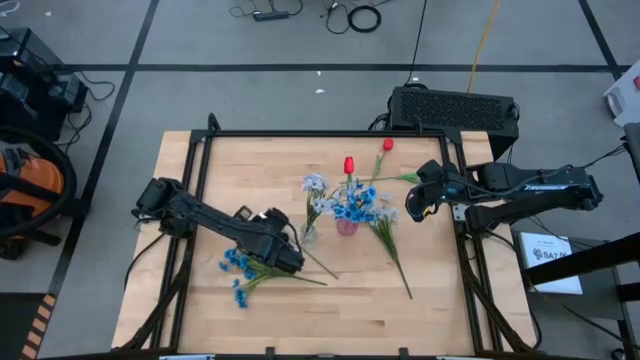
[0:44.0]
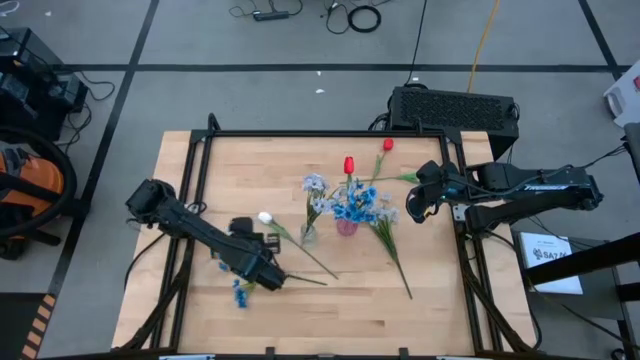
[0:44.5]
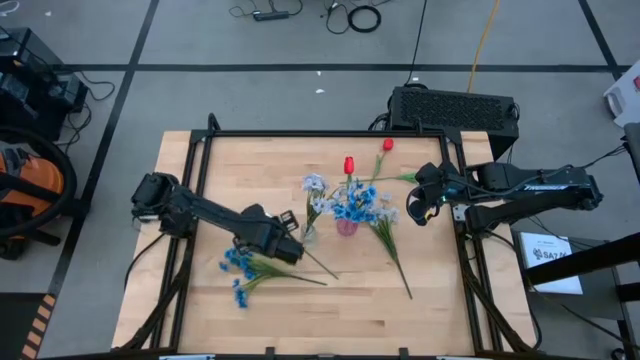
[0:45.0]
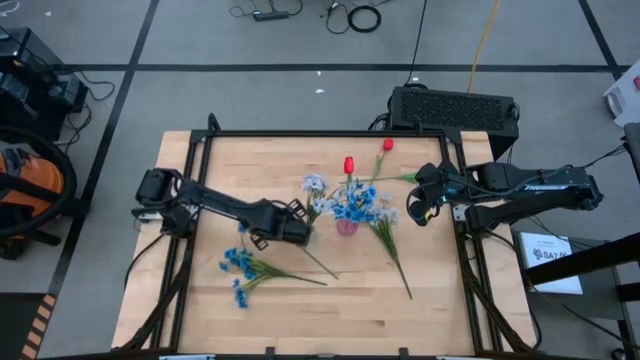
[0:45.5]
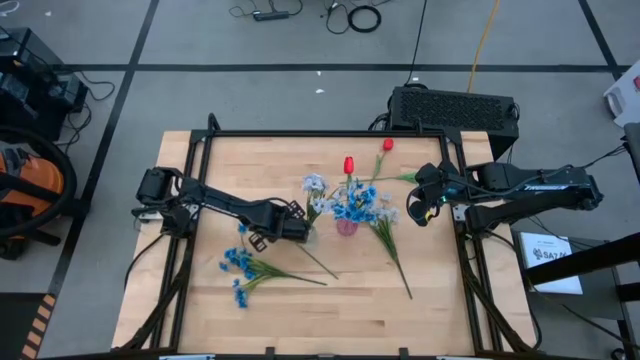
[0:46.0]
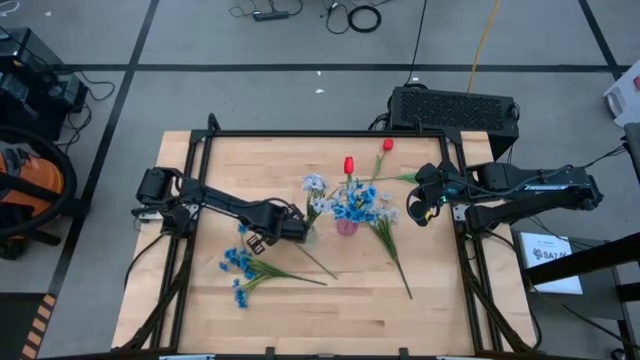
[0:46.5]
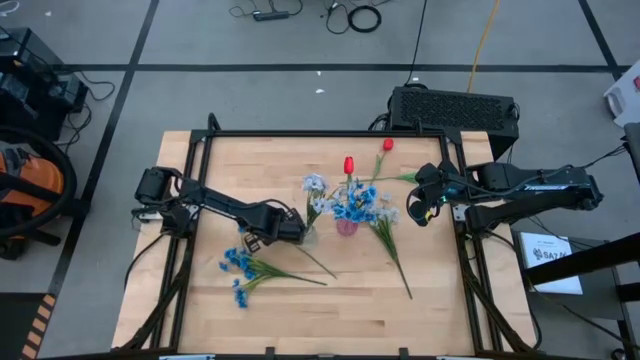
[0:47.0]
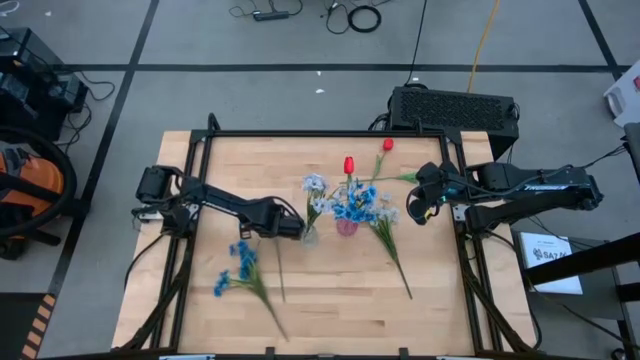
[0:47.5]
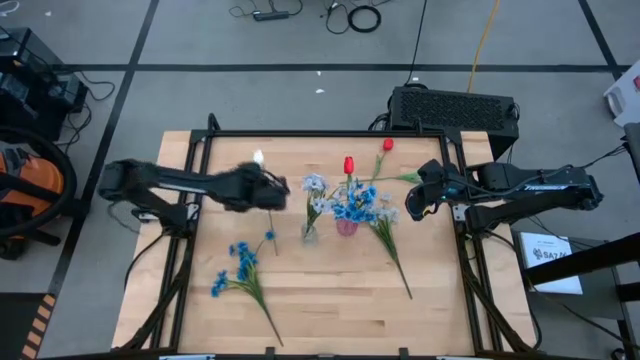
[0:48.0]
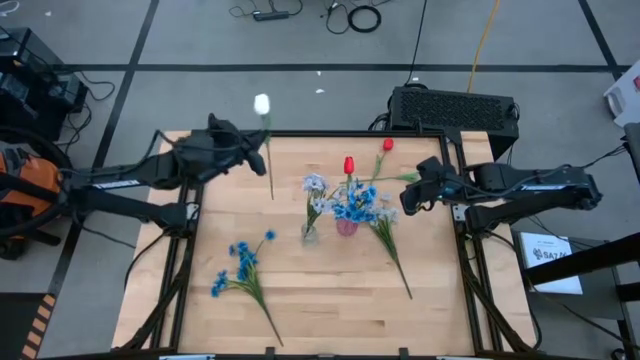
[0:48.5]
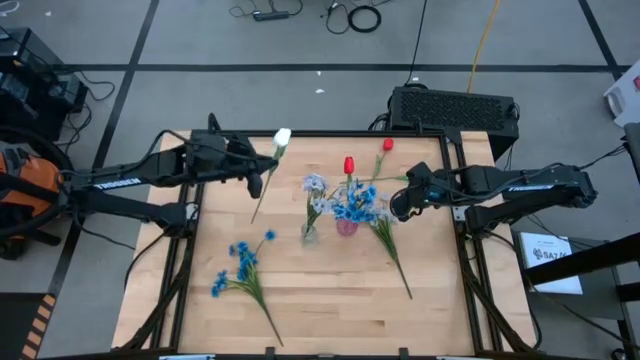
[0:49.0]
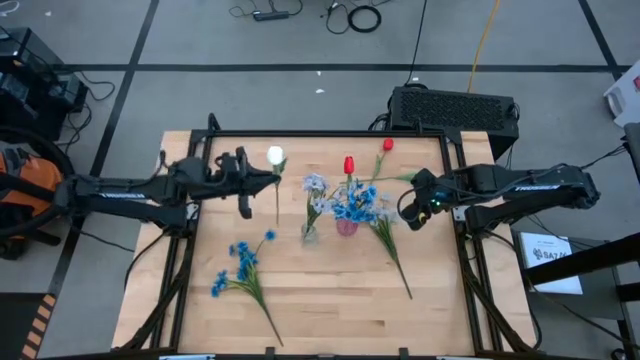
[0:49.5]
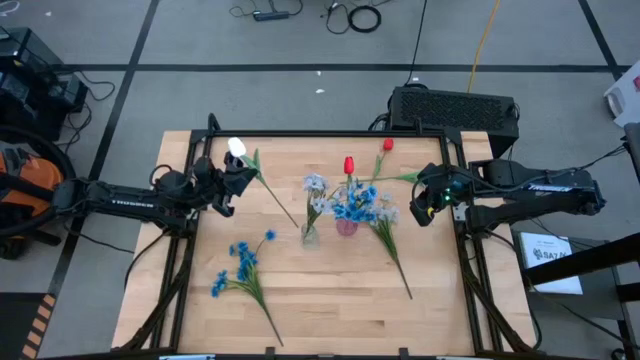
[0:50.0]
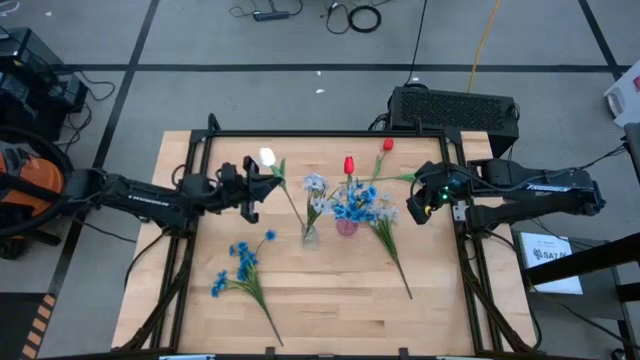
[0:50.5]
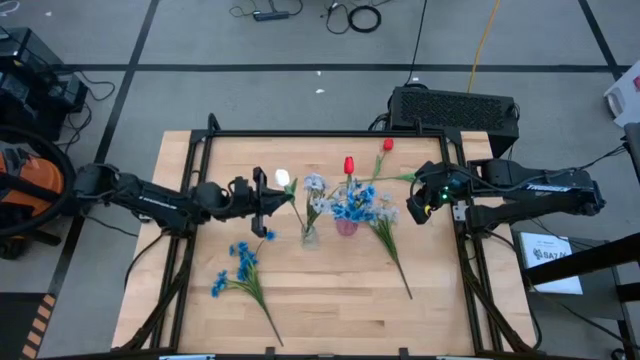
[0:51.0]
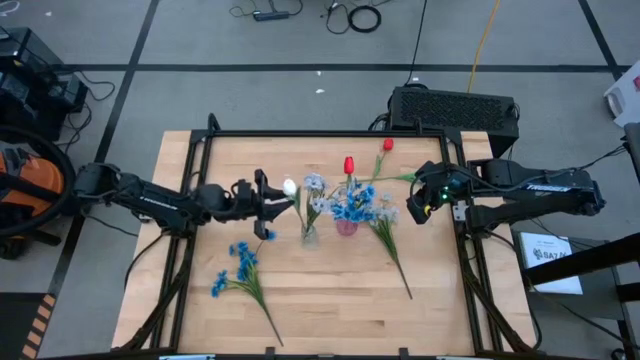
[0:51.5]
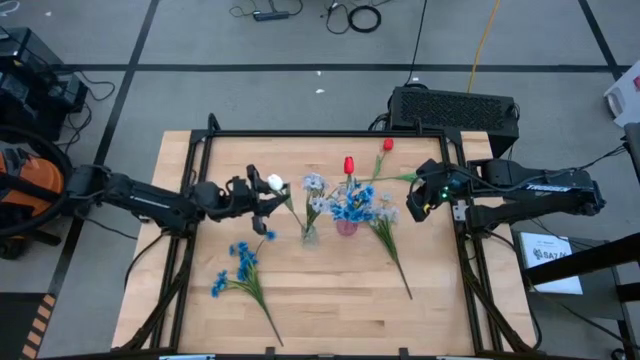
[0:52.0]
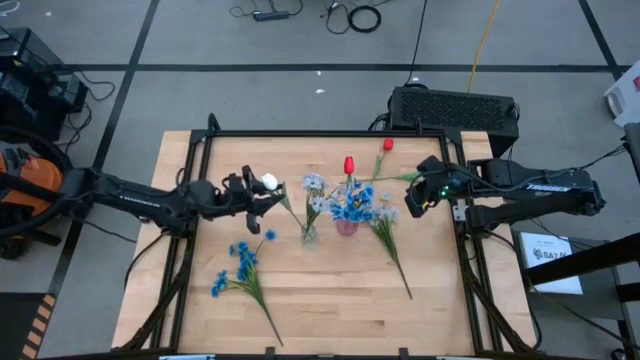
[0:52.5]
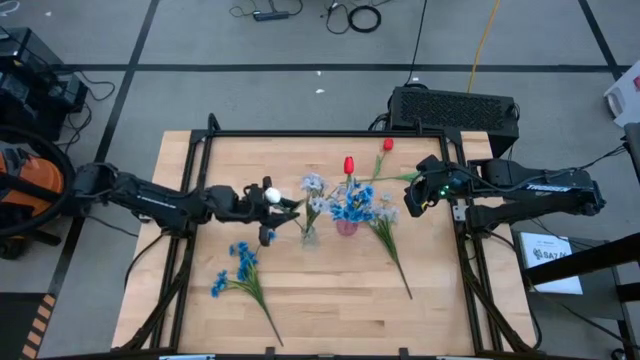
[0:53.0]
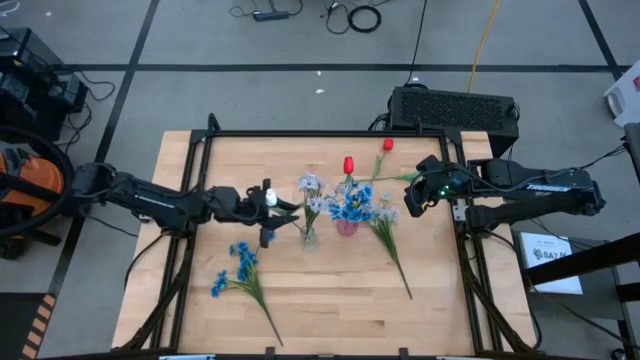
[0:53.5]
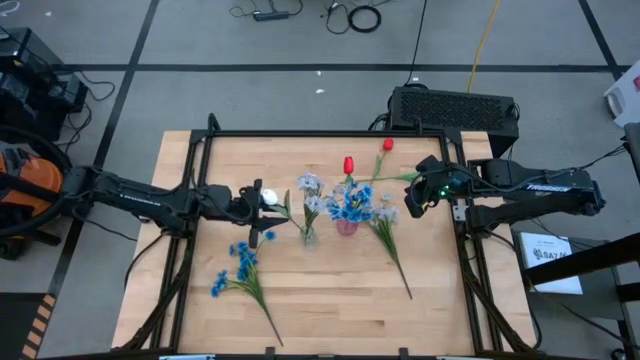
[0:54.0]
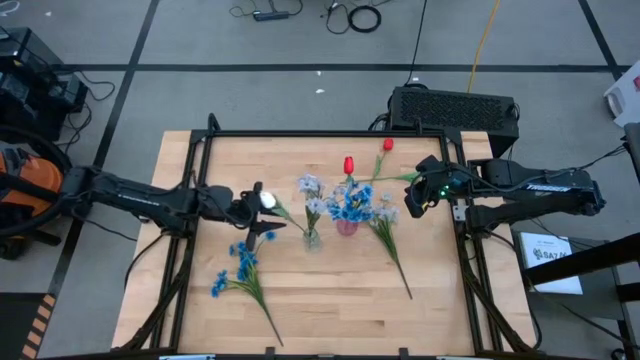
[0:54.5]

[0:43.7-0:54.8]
Task: Sort flowers into vase by color
Put the bottom white flower into the transparent vase

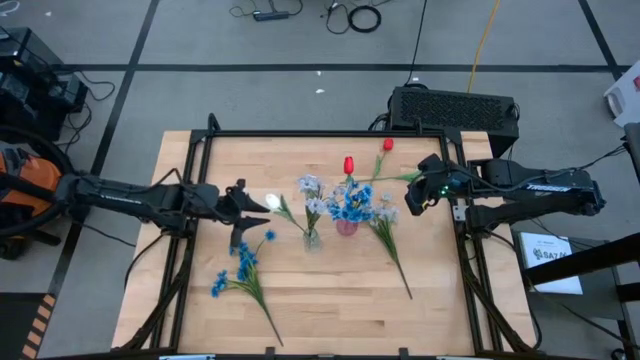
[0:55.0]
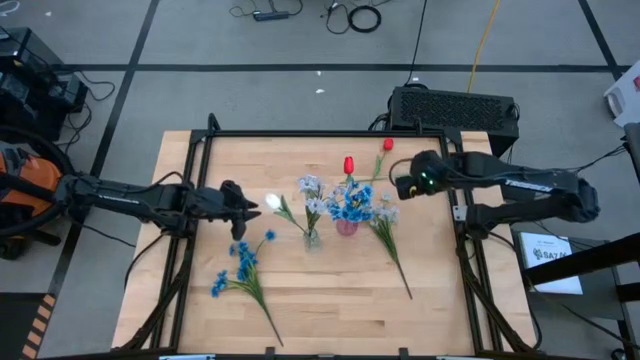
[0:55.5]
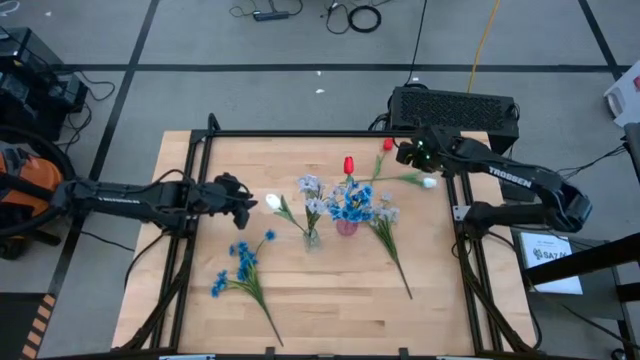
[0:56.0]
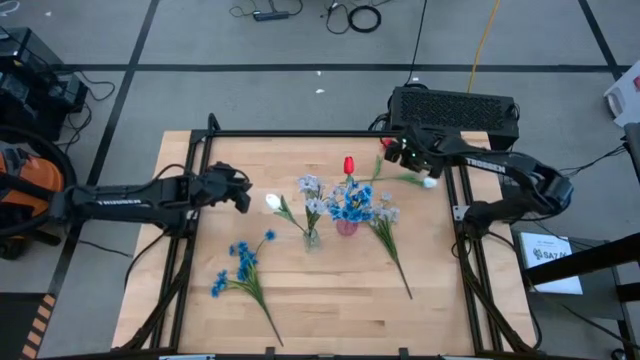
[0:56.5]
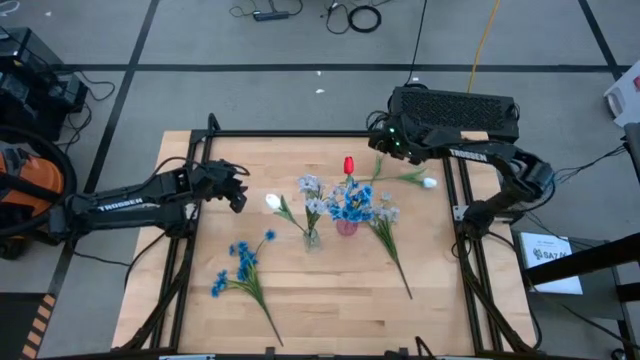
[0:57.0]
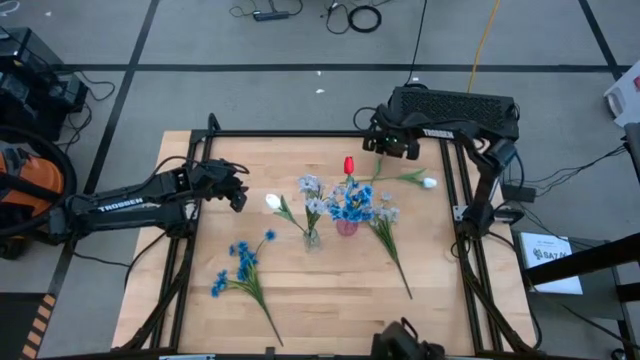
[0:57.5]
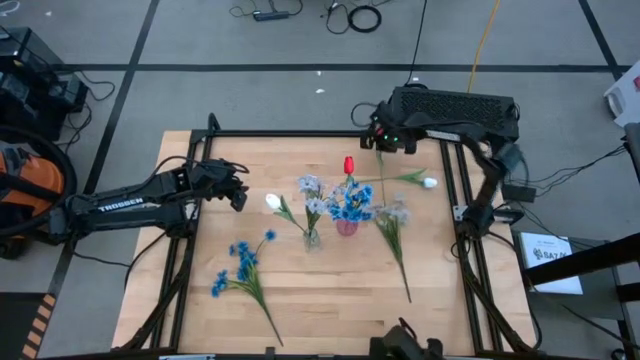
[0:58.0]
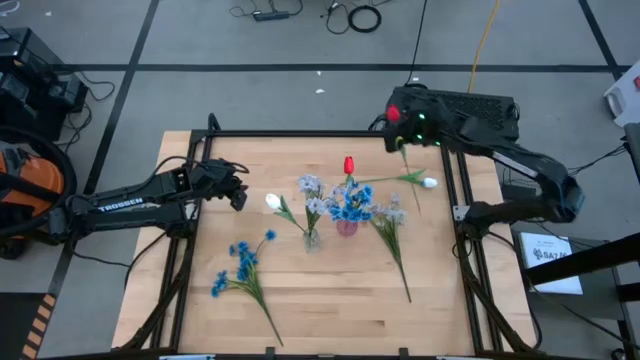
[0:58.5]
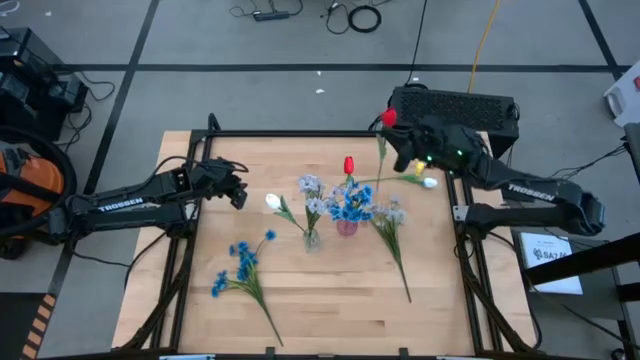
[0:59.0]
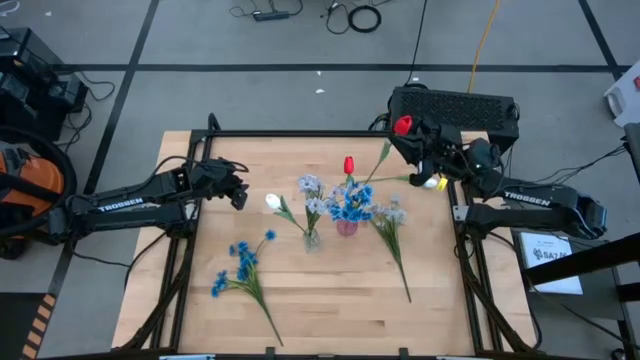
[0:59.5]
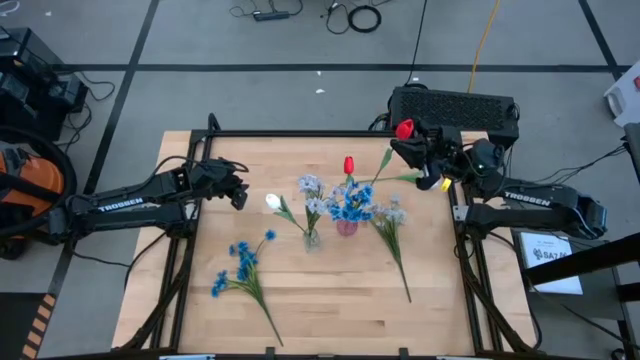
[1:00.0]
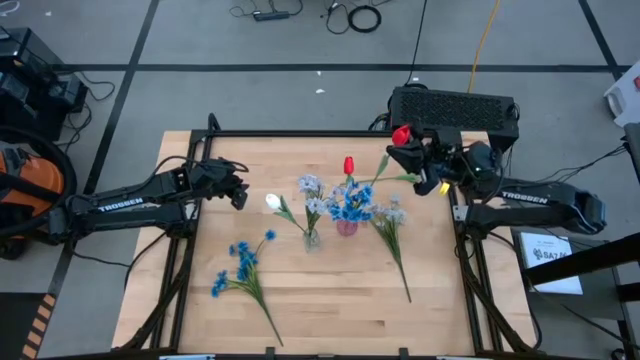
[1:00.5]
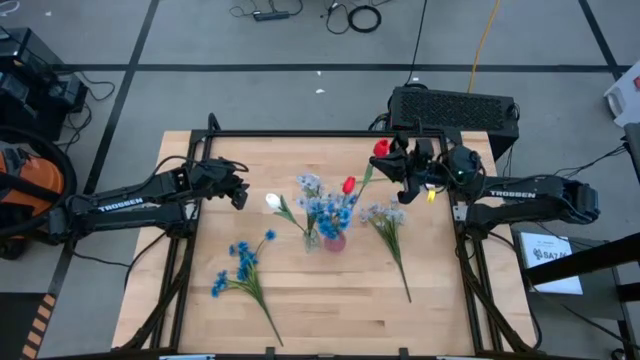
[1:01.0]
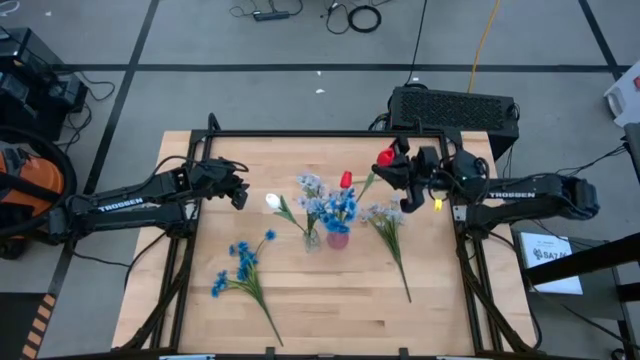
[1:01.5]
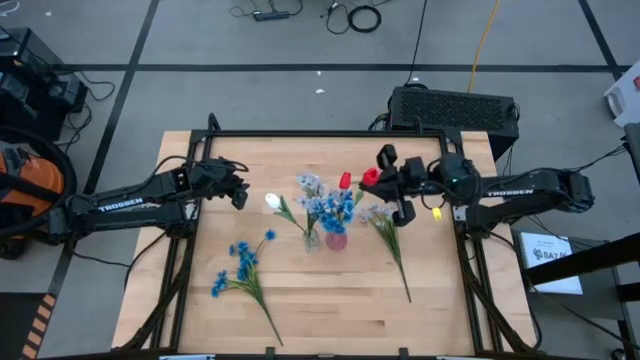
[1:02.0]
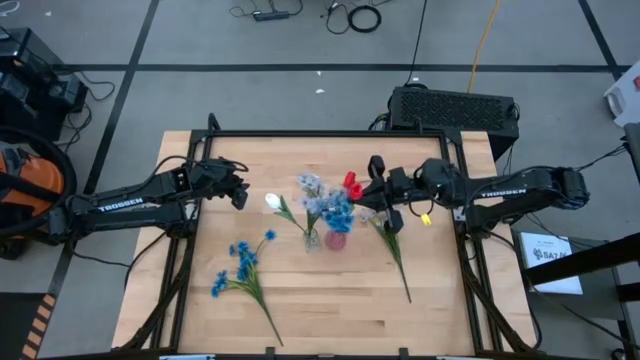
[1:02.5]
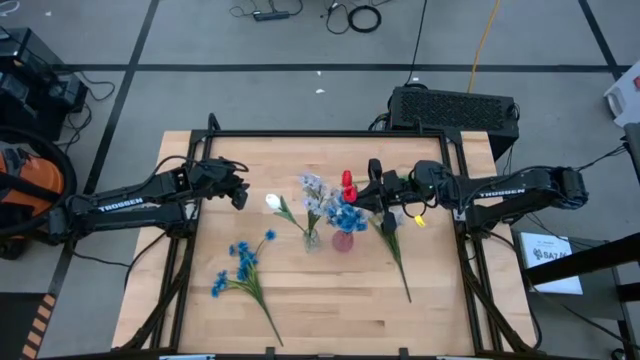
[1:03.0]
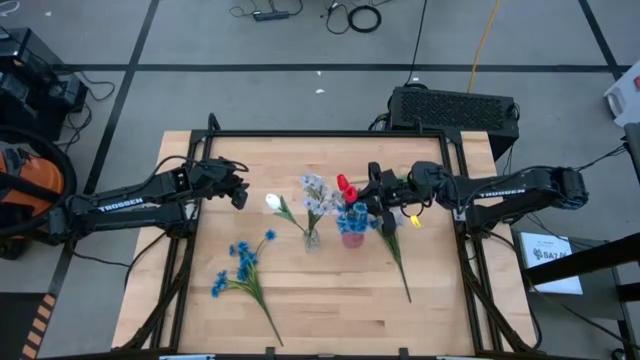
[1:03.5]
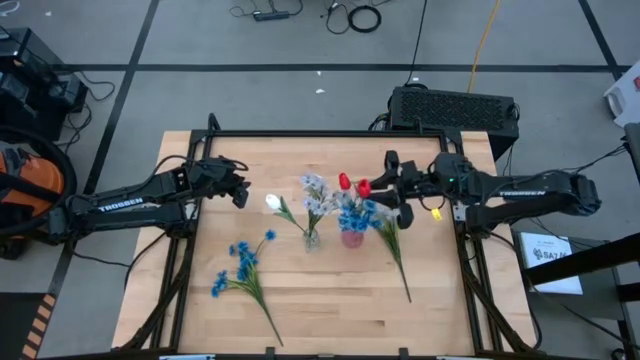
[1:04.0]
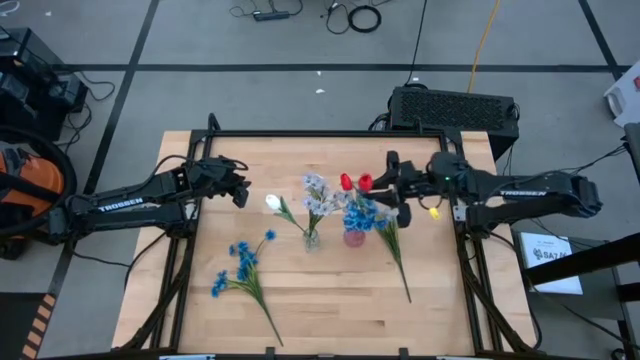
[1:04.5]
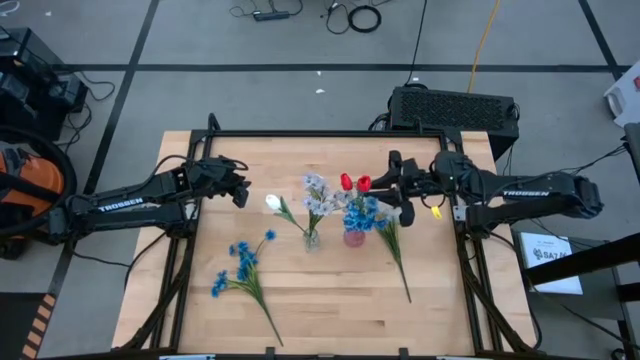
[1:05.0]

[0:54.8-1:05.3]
Put the red flower into the pink vase

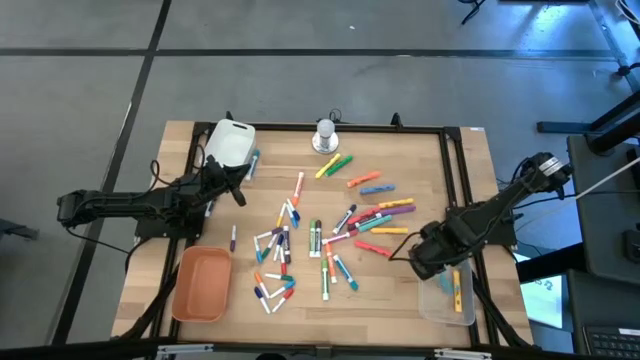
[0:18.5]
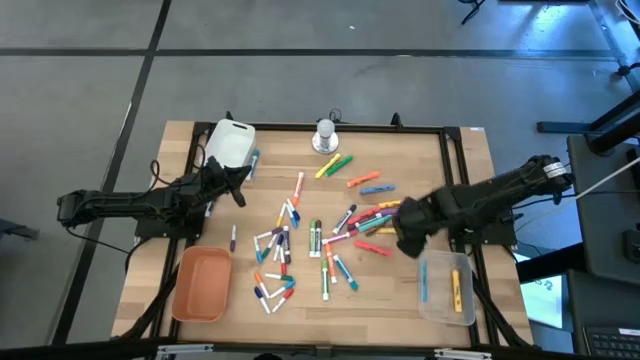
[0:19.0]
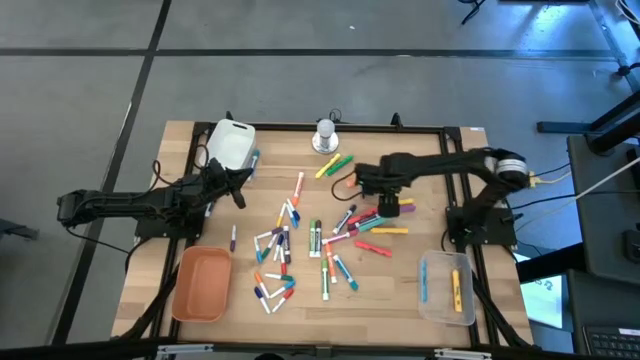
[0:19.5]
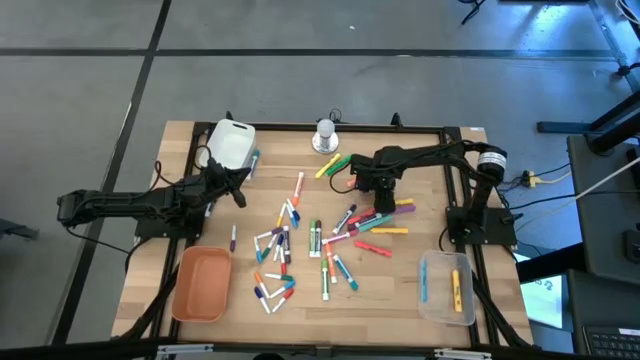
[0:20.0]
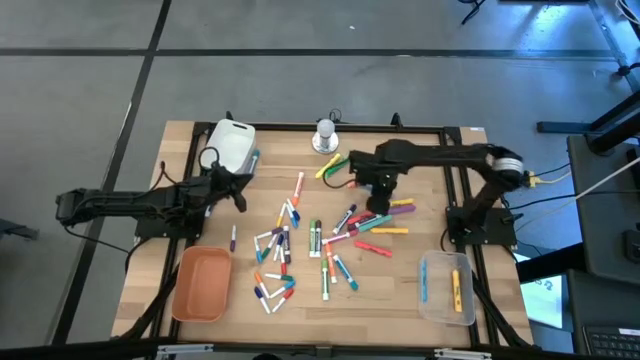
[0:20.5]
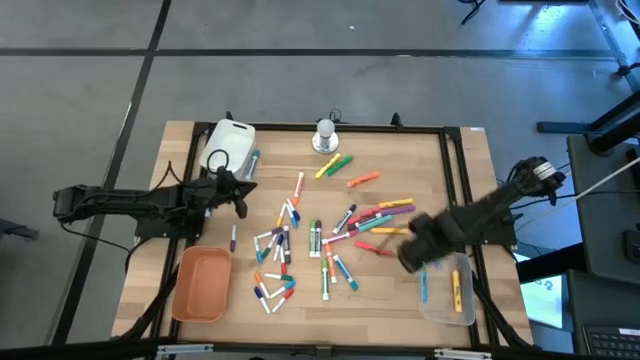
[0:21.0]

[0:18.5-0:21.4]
Task: Pick & Place Markers
Put the blue highlighter pen into the transparent bin
